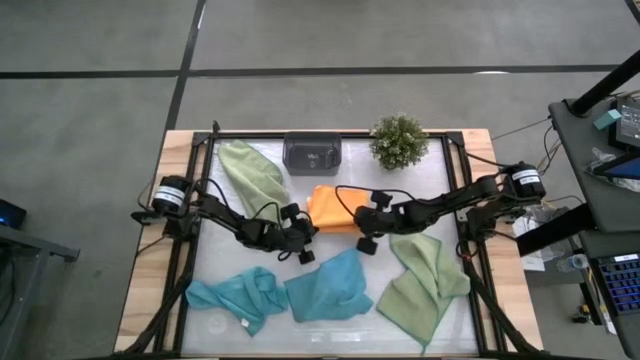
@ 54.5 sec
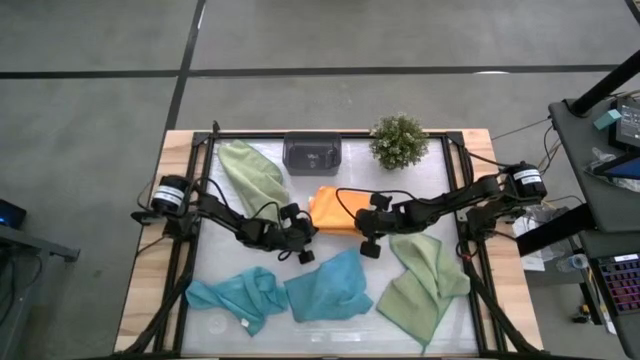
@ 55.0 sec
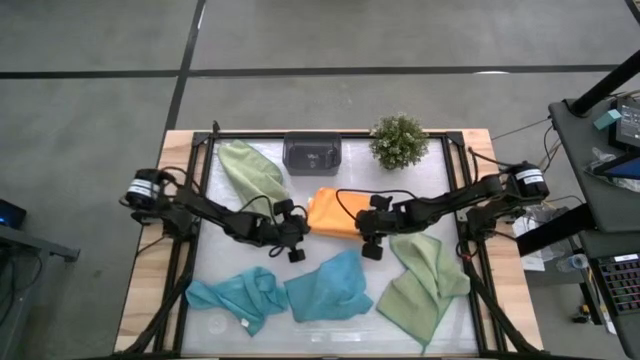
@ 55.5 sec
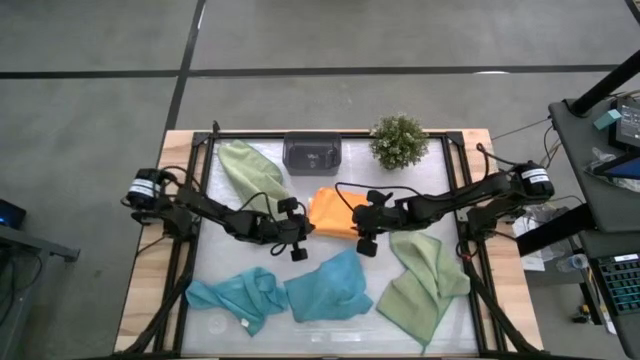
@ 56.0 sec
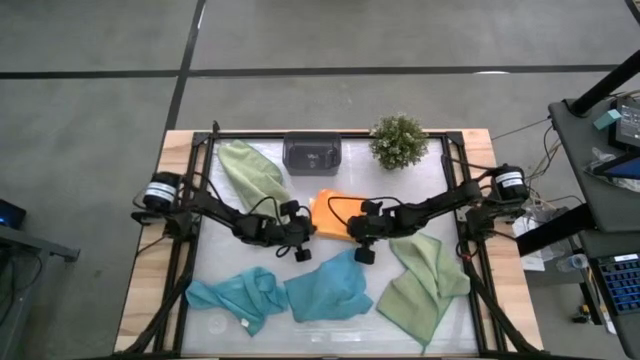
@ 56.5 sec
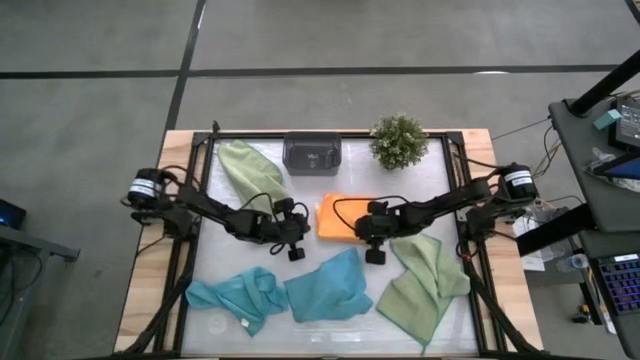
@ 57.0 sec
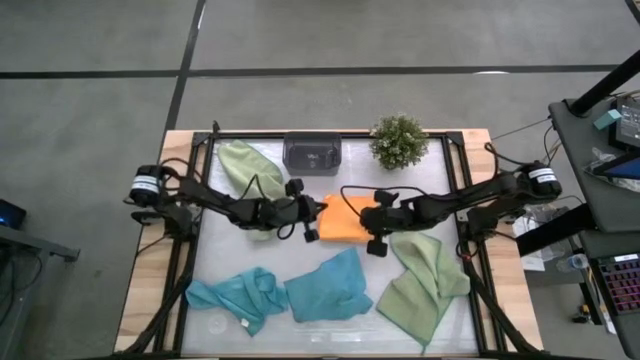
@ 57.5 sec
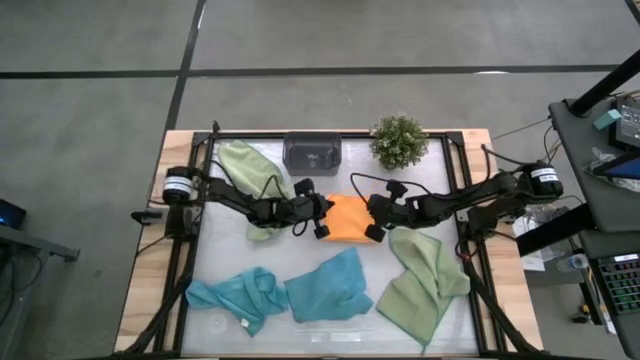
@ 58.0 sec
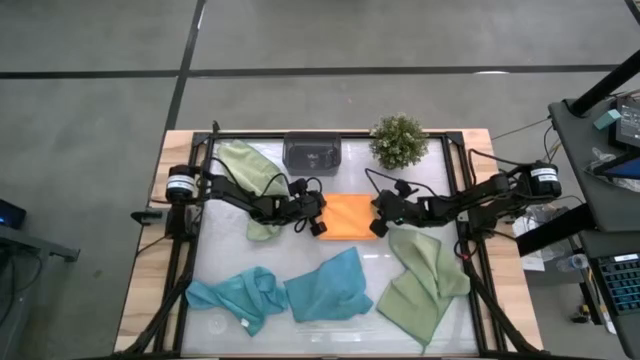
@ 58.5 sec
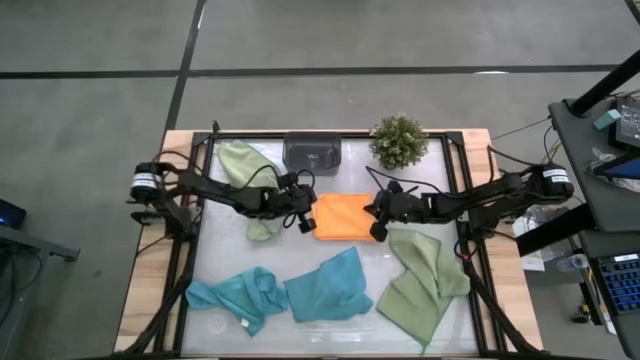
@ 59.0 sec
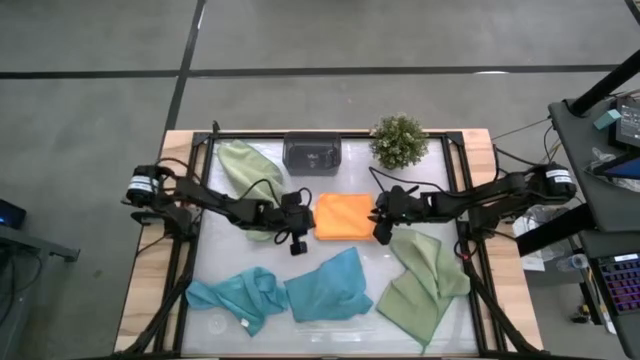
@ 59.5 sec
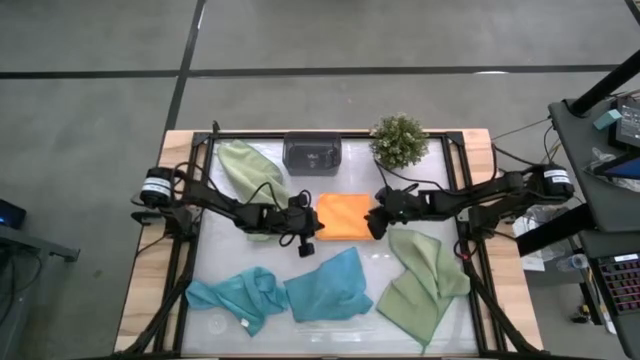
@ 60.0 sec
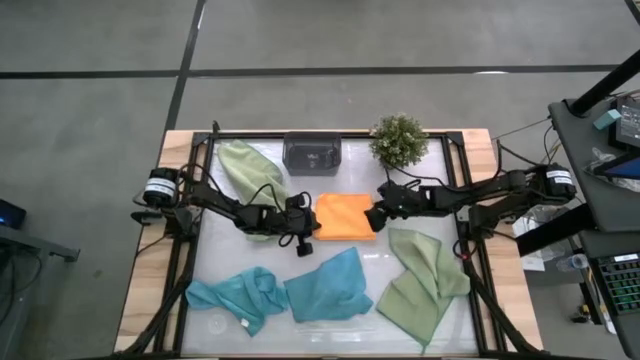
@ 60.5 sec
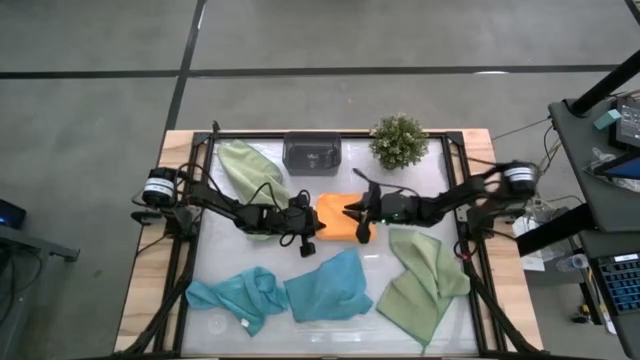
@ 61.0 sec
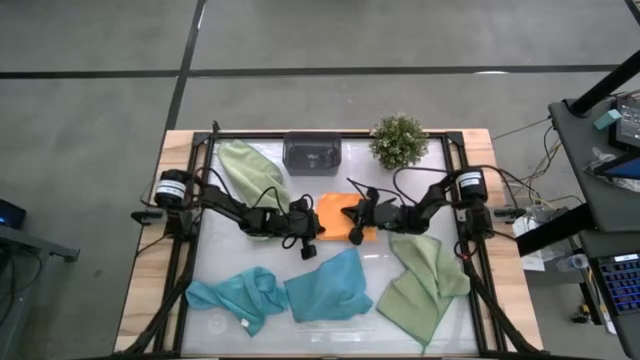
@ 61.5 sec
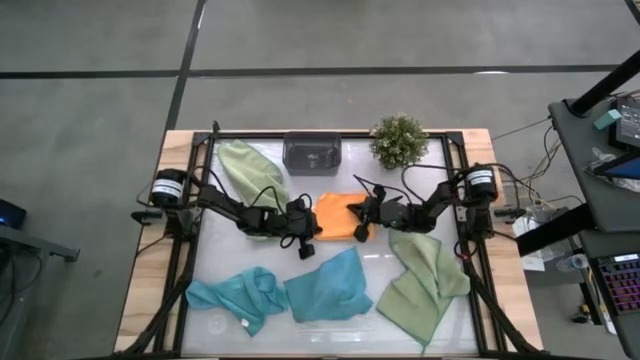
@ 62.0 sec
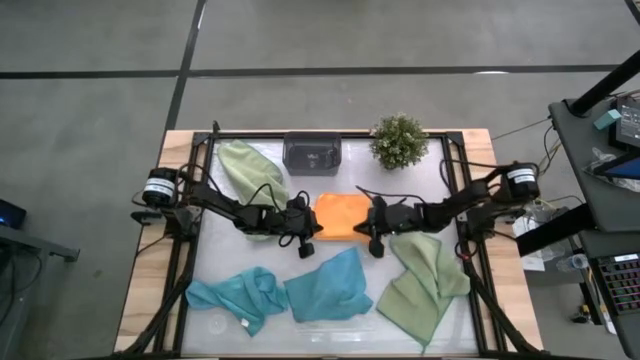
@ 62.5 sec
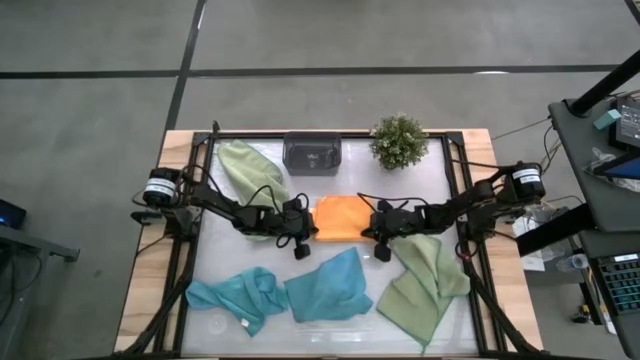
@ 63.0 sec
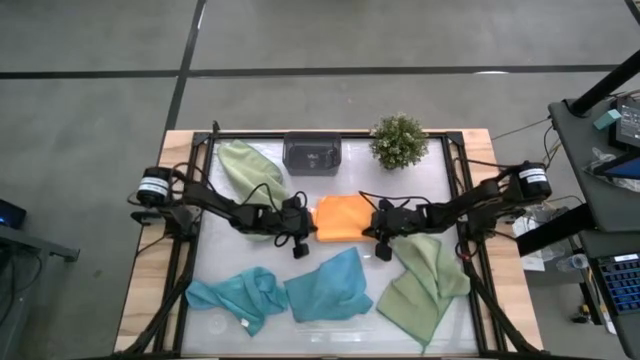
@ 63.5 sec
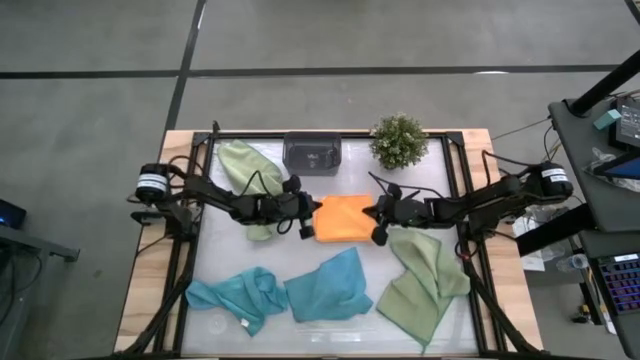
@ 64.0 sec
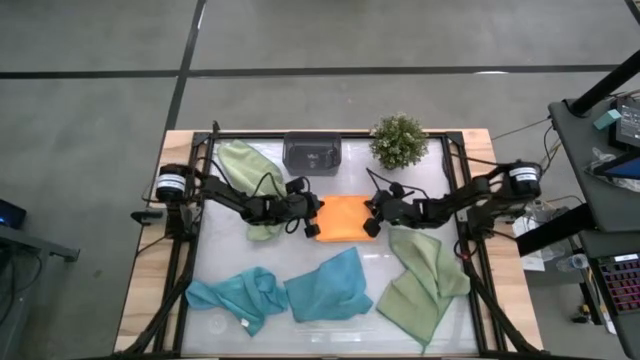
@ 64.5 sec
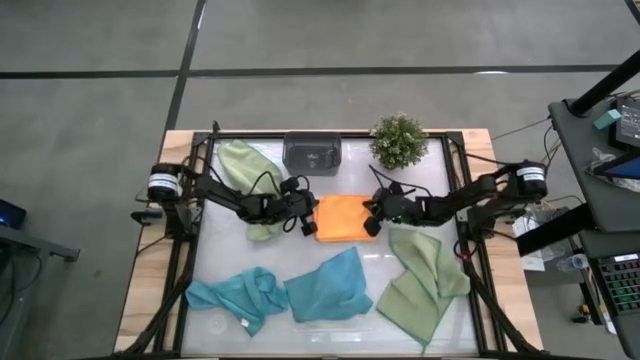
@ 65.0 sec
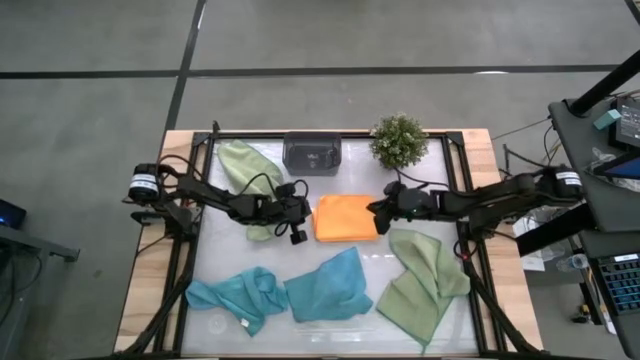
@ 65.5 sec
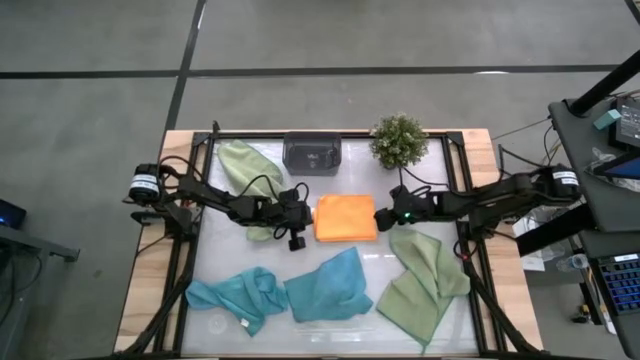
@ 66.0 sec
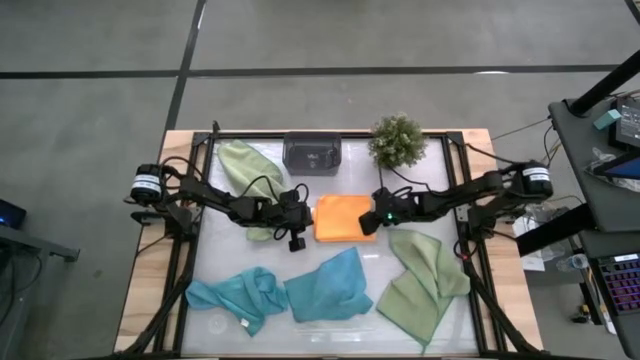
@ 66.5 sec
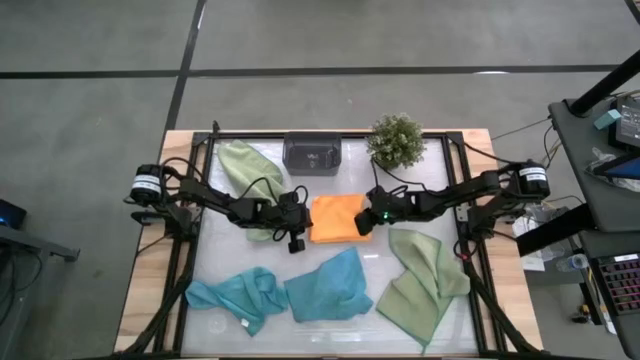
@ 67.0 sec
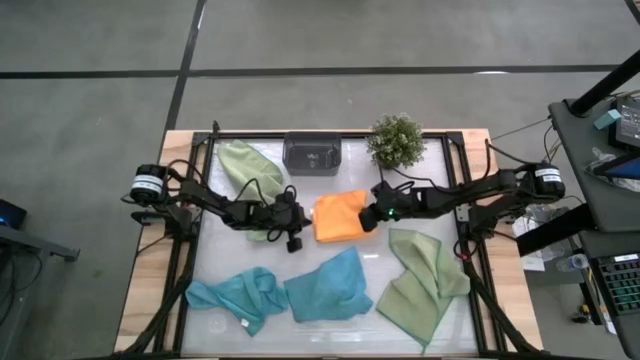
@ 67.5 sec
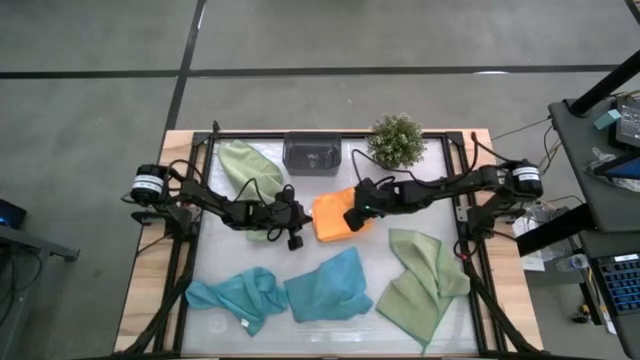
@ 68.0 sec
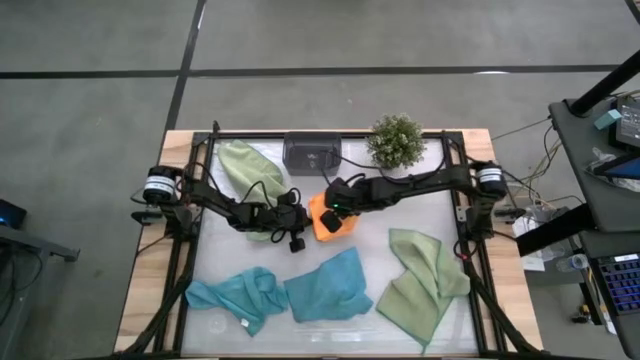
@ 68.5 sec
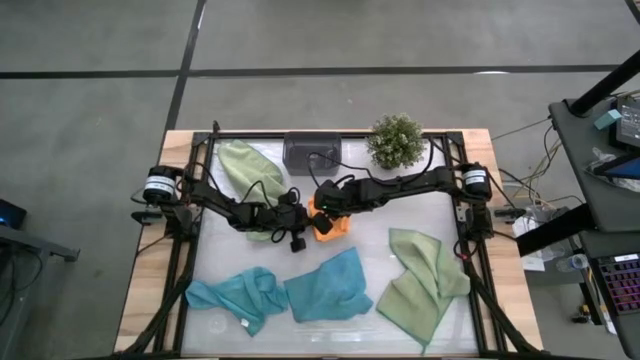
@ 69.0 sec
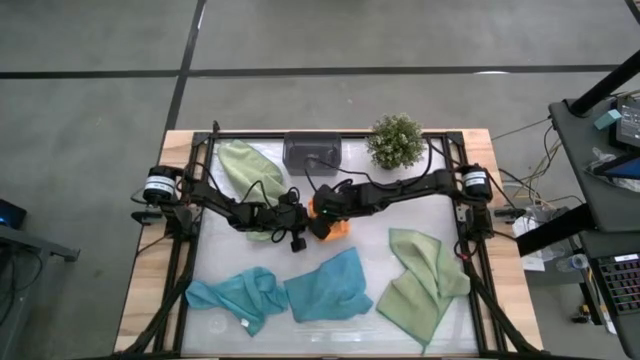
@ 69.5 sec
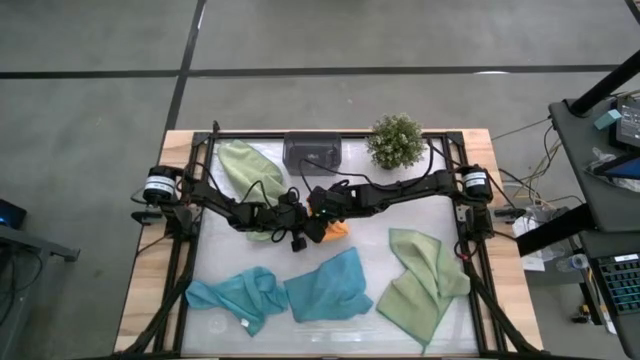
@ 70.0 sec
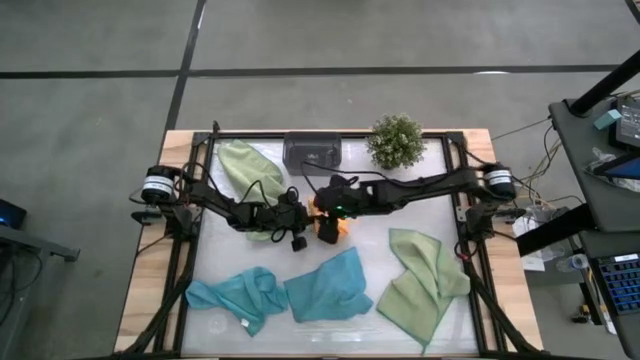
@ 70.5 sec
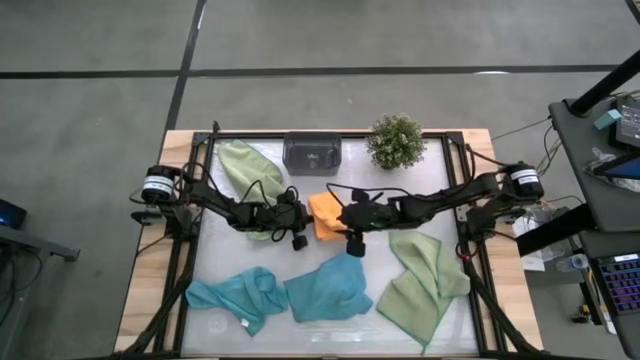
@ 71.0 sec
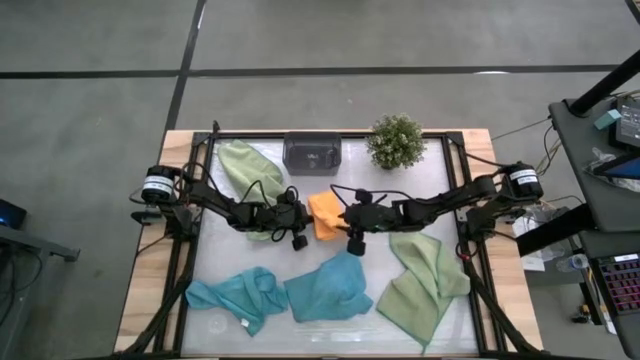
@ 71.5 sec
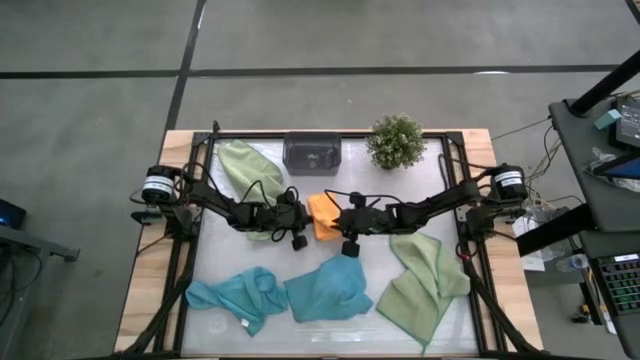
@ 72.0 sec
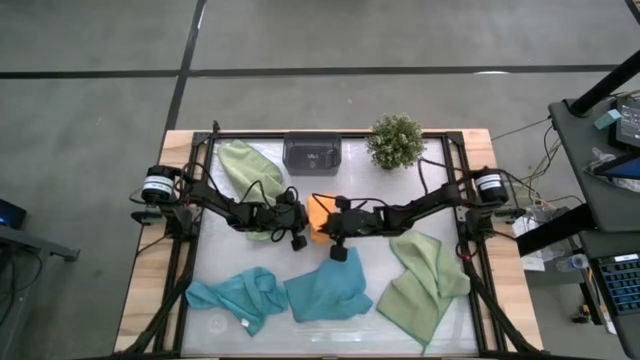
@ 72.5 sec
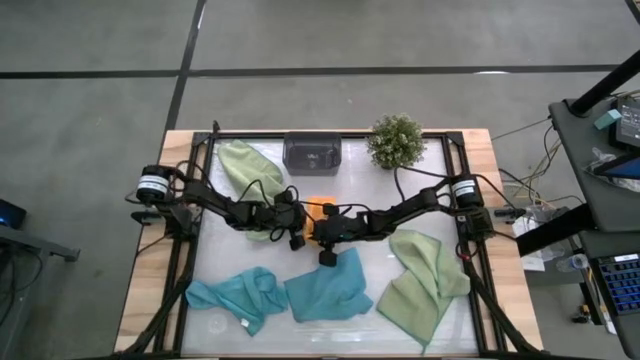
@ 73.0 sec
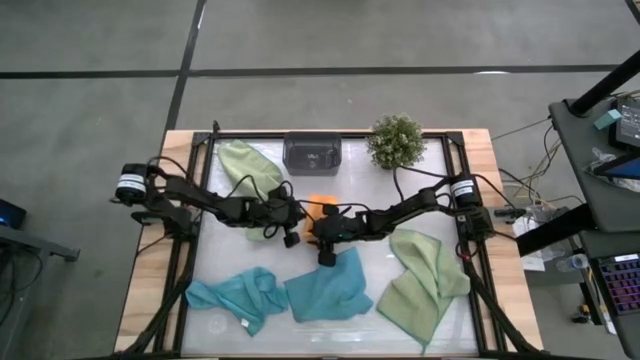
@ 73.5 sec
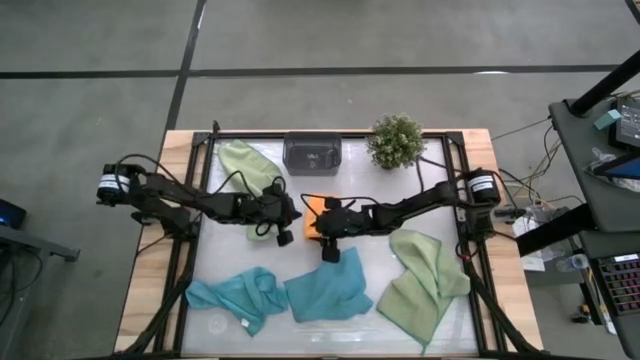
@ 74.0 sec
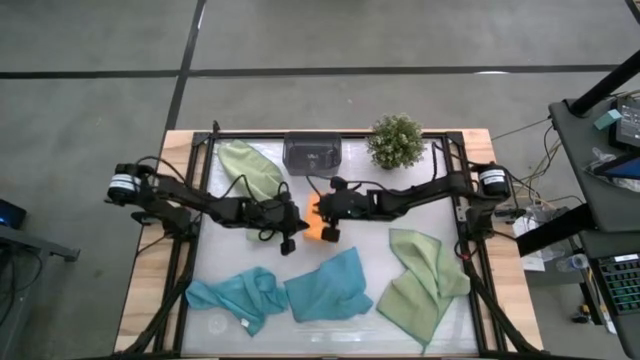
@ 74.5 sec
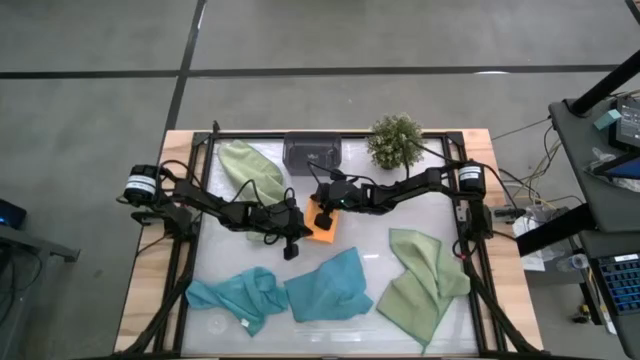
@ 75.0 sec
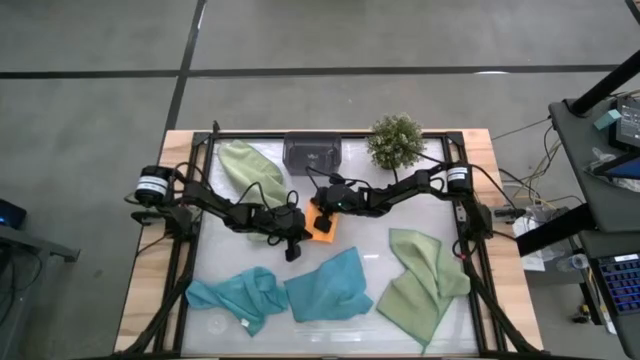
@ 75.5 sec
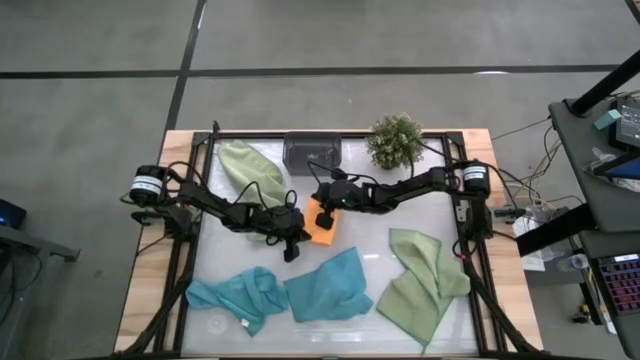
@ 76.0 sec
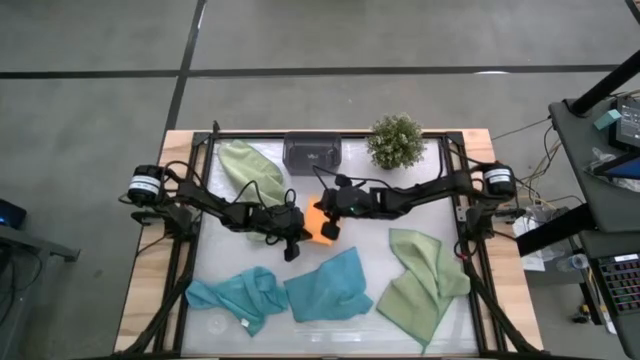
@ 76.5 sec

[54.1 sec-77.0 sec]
Task: Fold microfiber towels
Fold the orange microfiber towel
